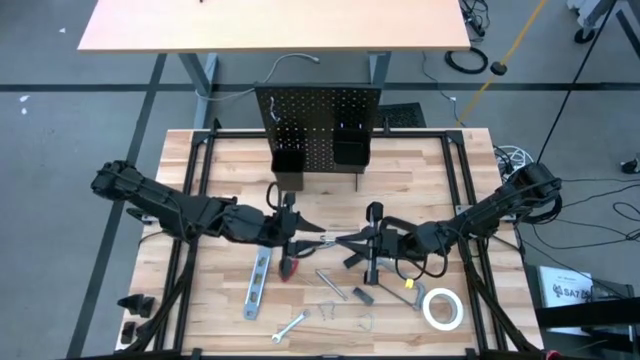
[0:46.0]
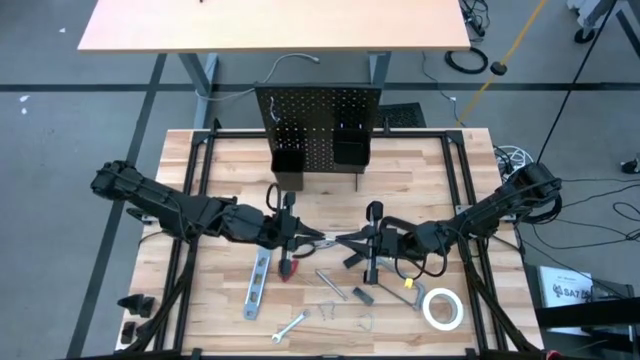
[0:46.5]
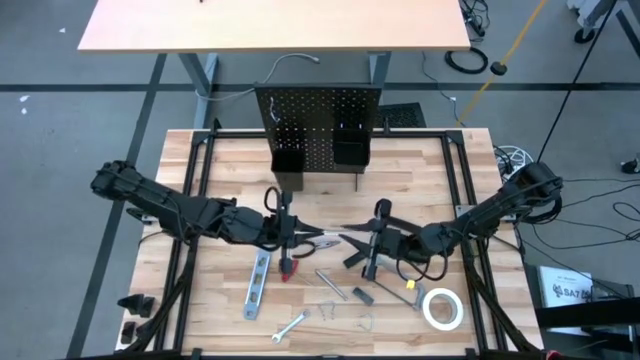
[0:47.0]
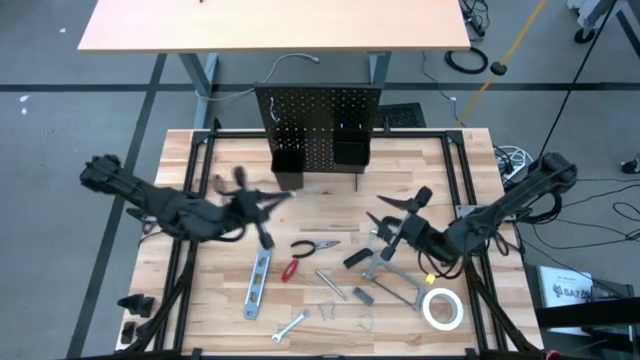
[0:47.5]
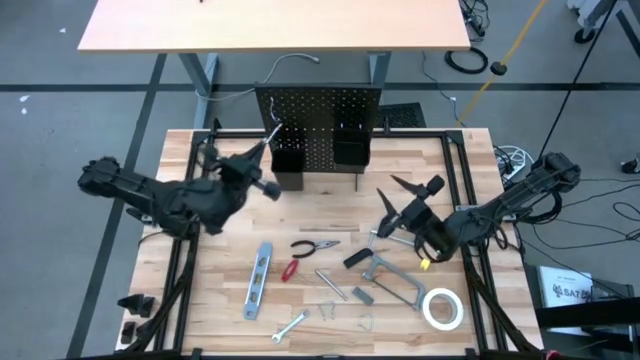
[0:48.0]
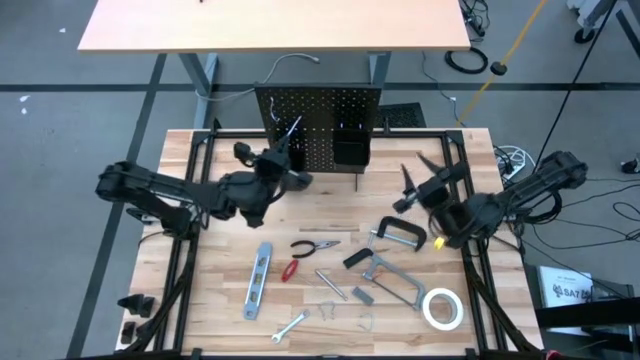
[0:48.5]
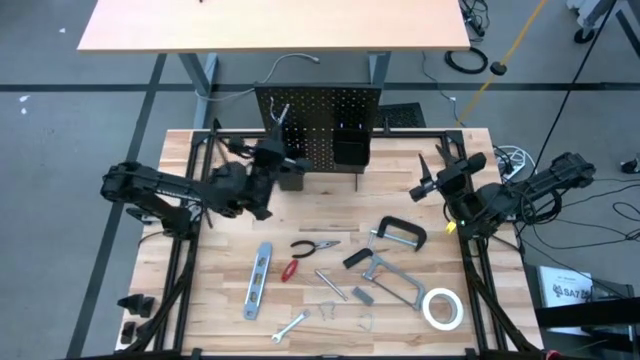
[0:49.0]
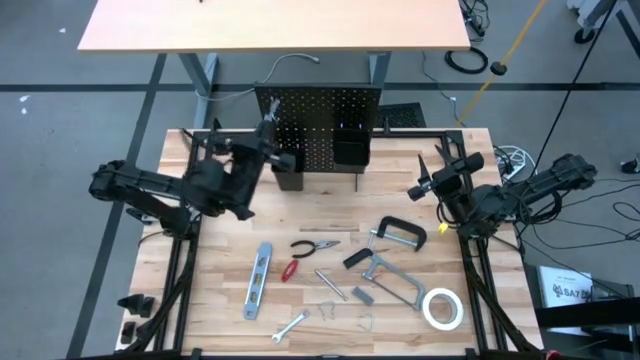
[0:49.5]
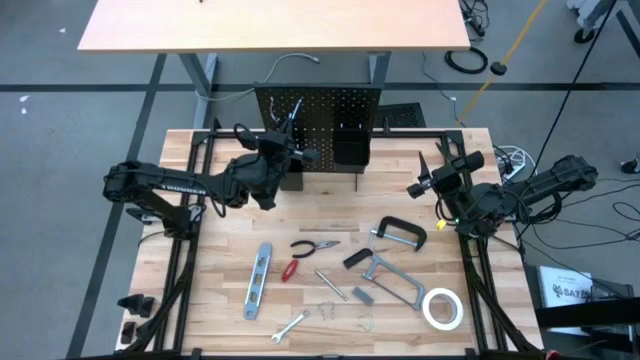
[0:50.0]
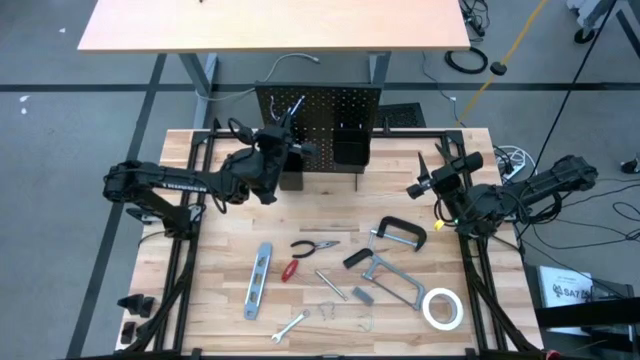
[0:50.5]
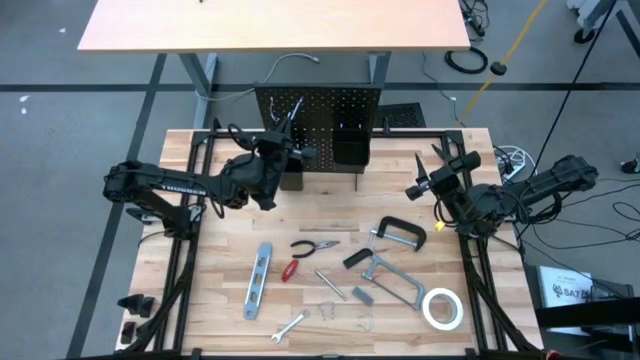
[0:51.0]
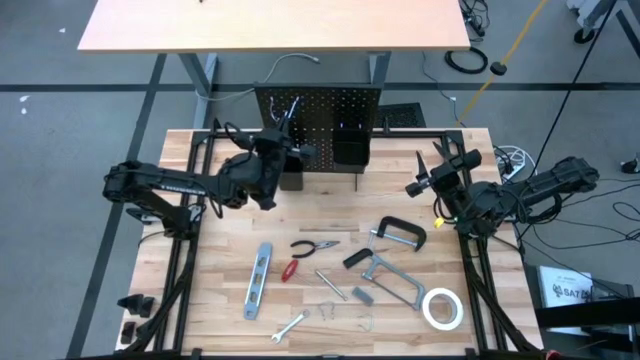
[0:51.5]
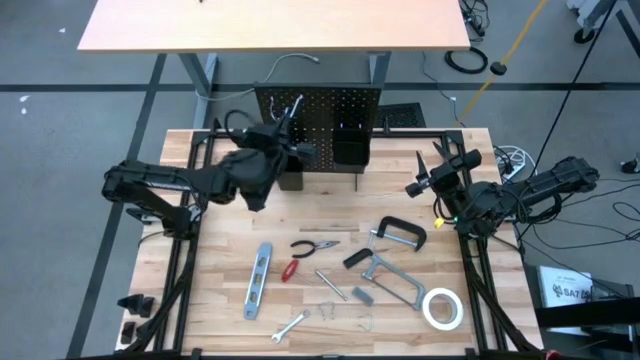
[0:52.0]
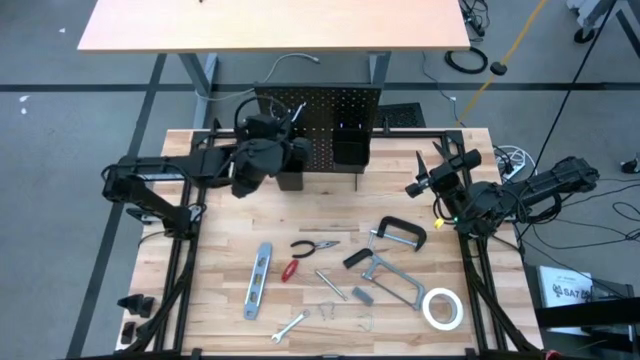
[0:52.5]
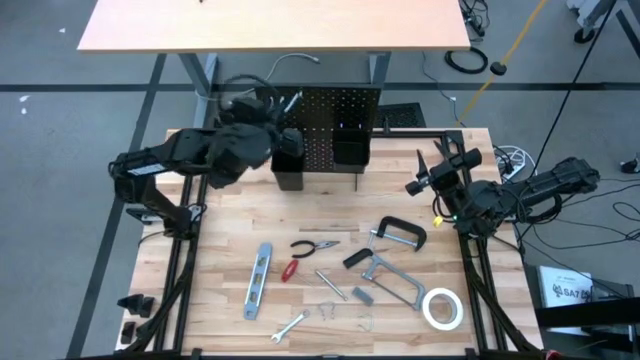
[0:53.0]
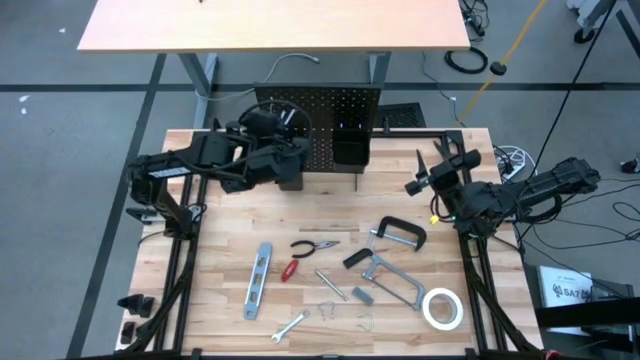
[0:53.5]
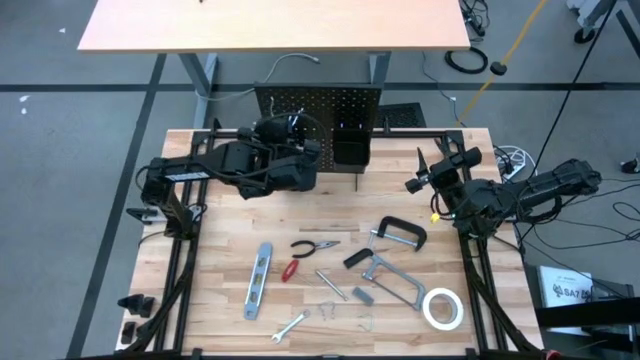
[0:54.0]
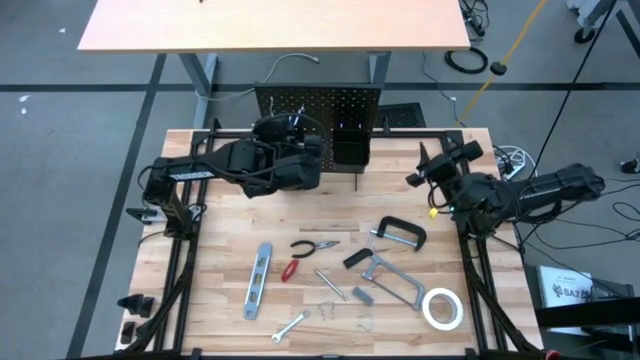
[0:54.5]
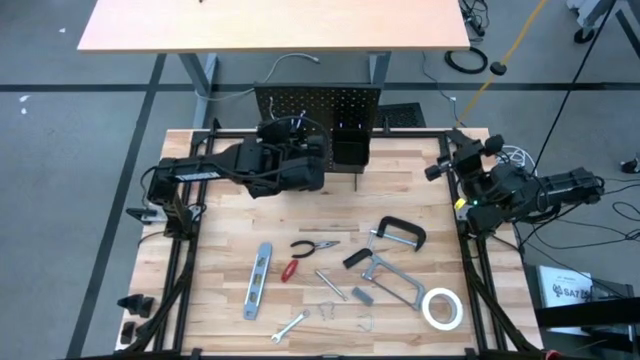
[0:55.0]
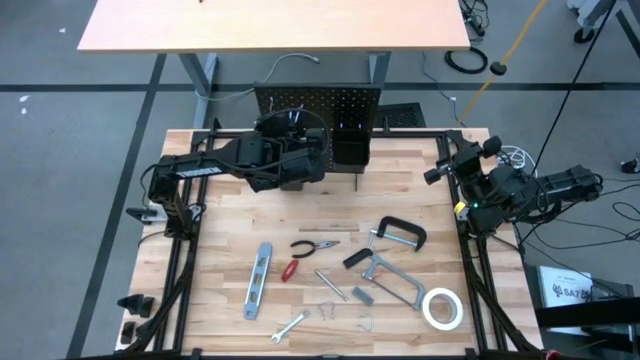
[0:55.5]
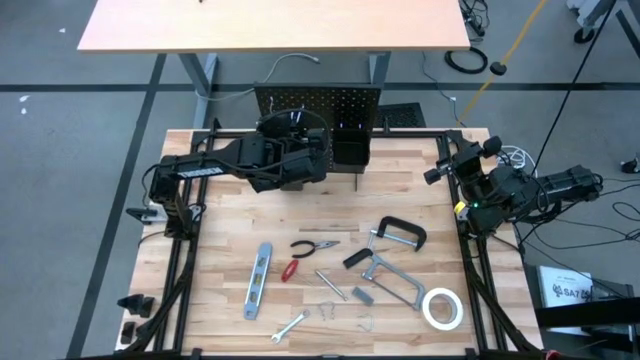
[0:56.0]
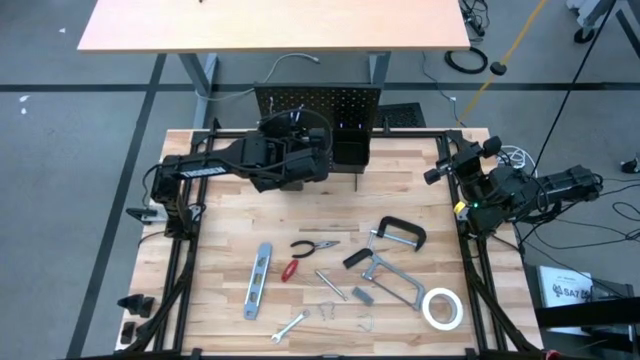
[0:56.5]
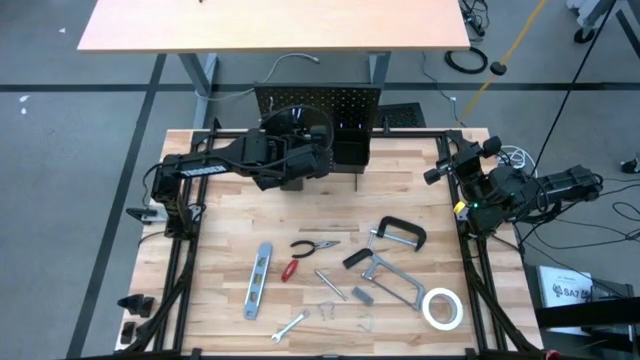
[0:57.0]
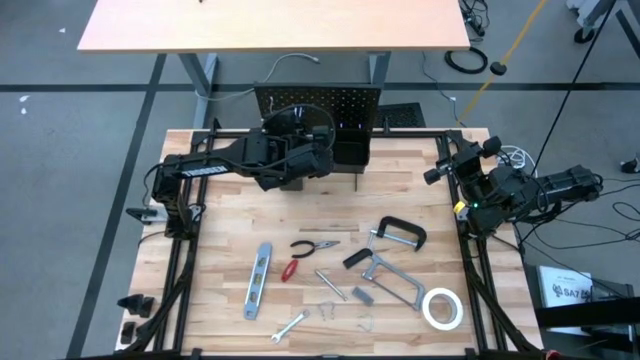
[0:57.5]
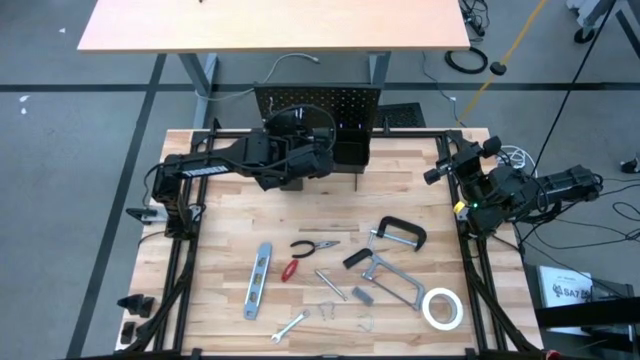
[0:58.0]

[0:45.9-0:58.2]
Task: Hang tools onto peg board
Insert the right silver hanger hook on the pegboard

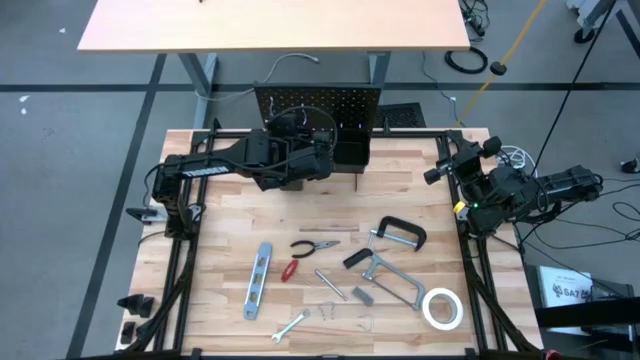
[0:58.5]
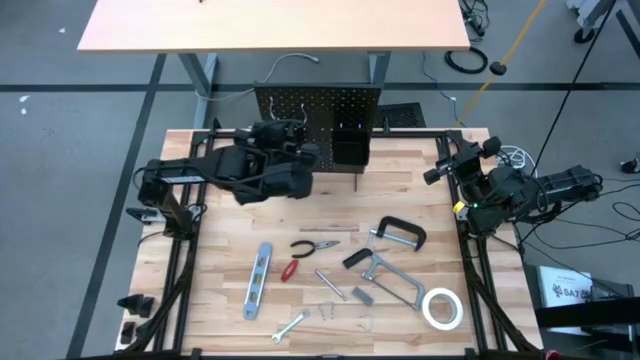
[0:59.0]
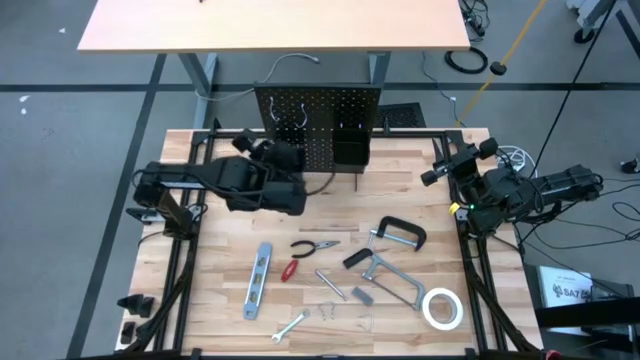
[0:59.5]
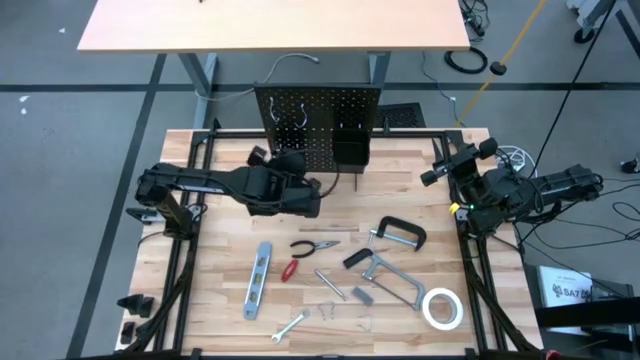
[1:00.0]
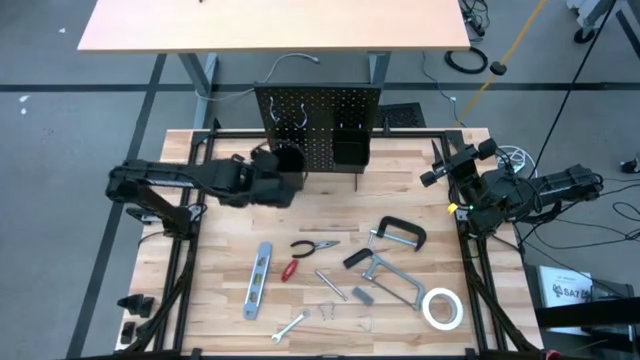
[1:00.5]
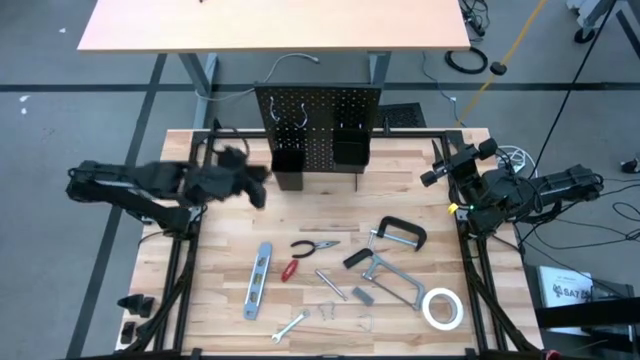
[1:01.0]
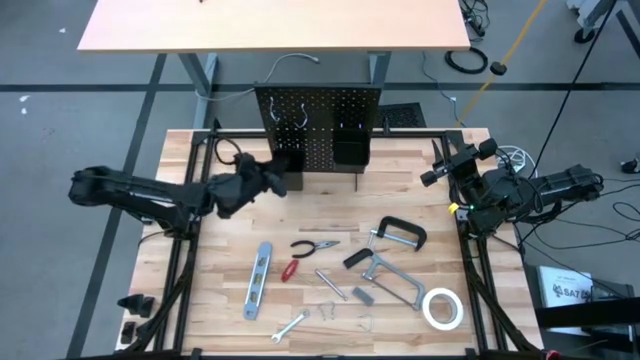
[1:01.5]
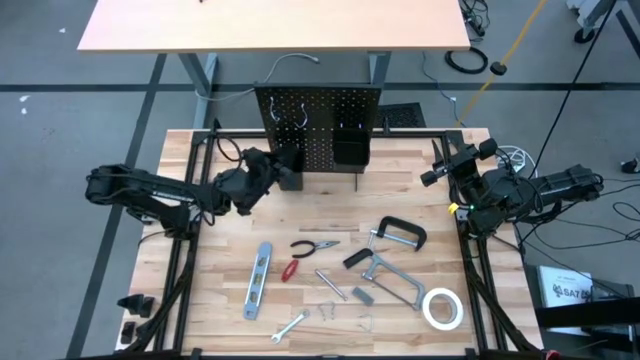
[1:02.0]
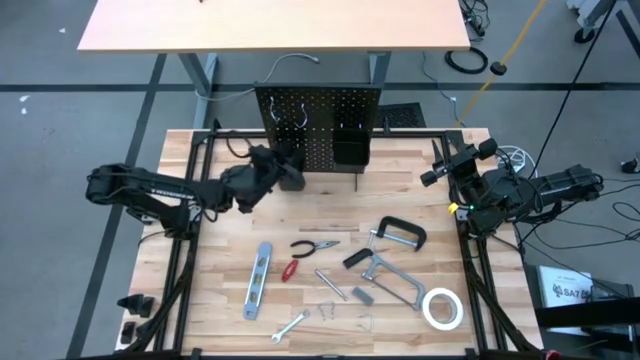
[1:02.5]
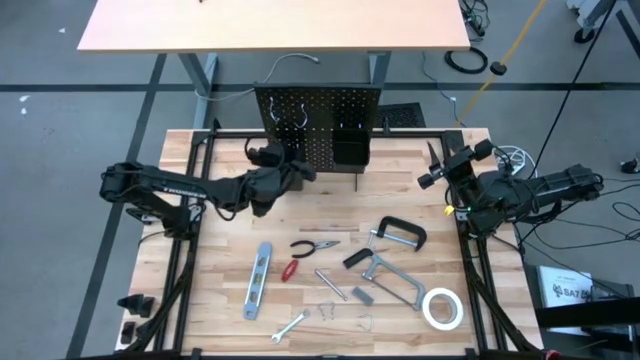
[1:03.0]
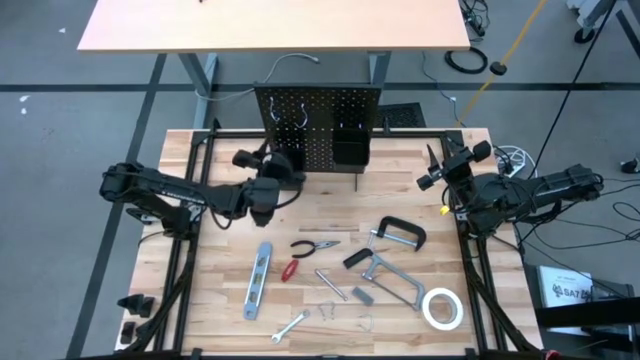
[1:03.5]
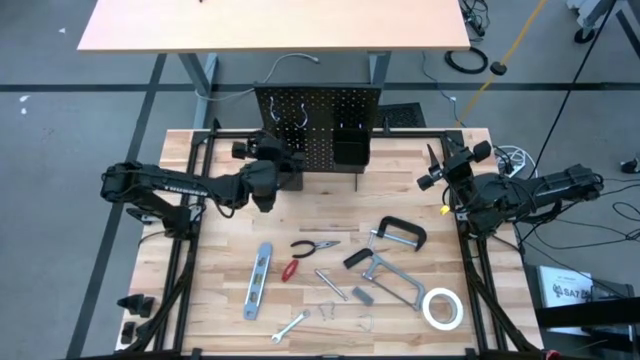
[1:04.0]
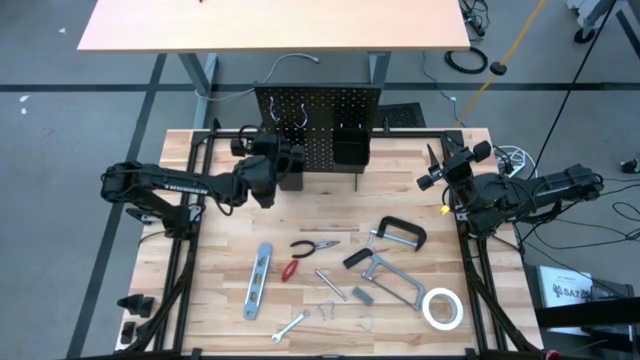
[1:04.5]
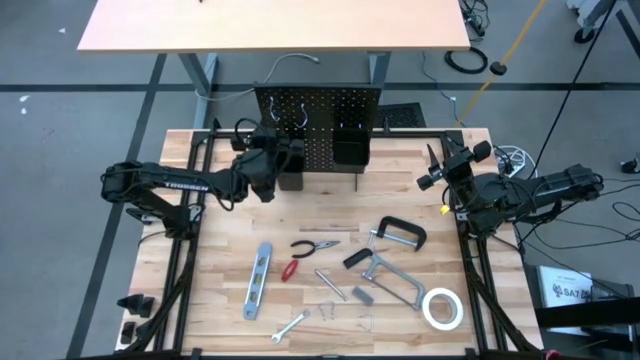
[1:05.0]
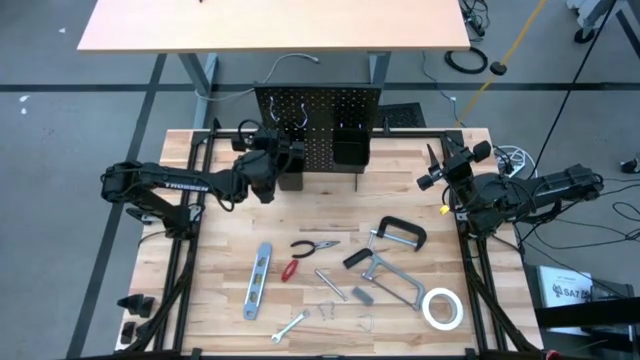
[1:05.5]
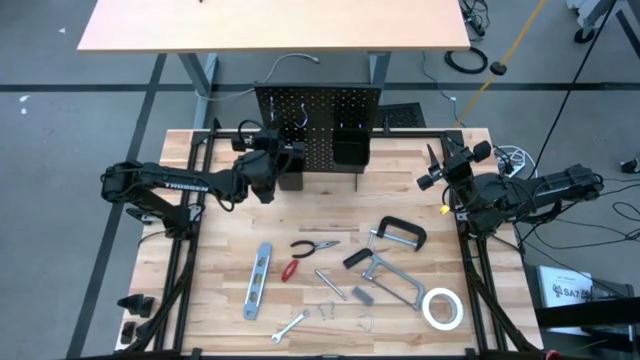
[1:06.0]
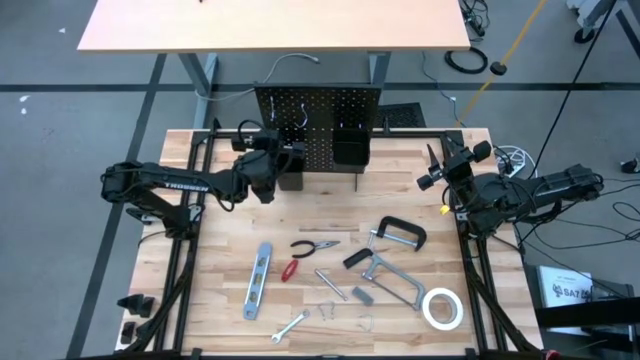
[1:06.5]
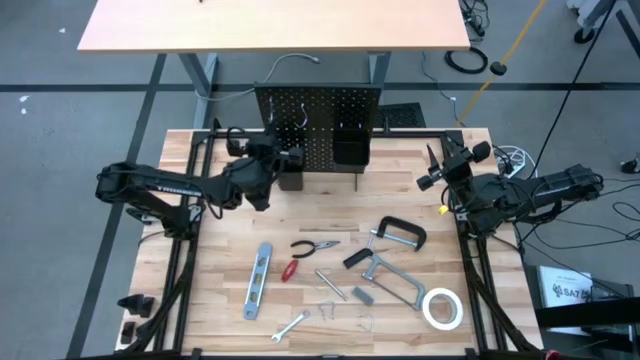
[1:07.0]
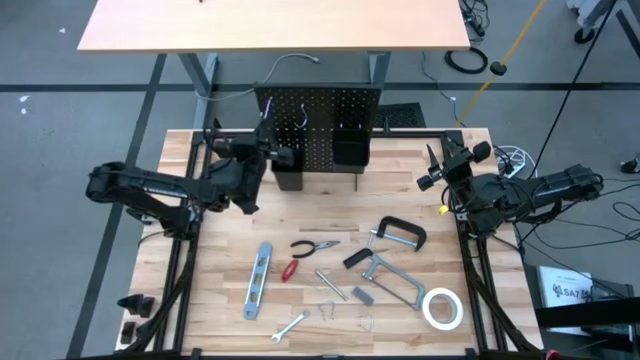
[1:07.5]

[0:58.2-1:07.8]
Remove the left silver hanger hook from the pegboard
